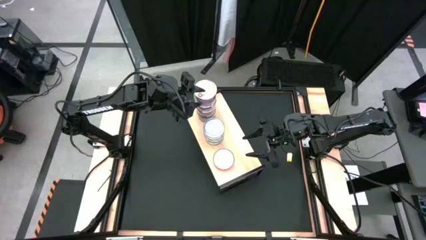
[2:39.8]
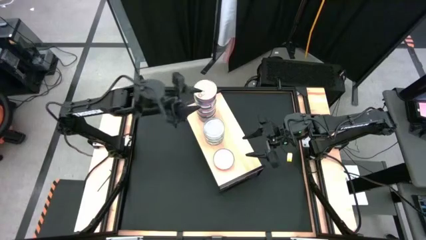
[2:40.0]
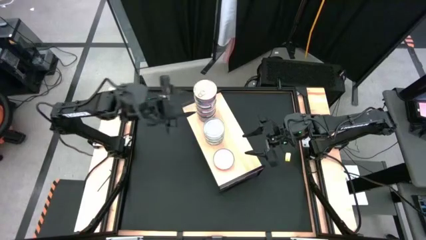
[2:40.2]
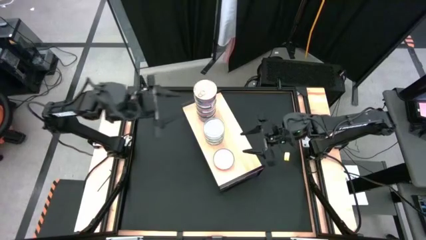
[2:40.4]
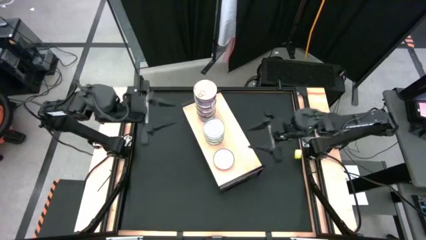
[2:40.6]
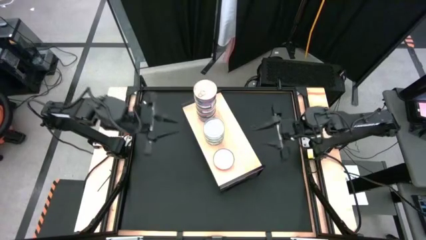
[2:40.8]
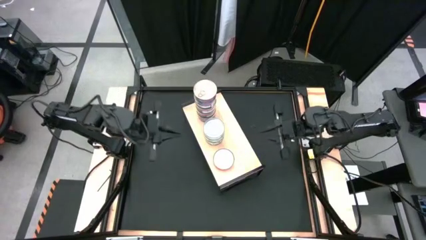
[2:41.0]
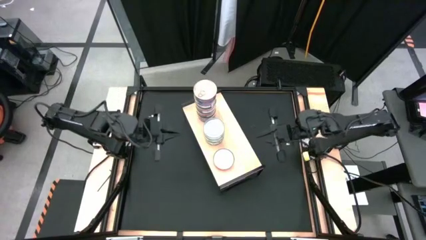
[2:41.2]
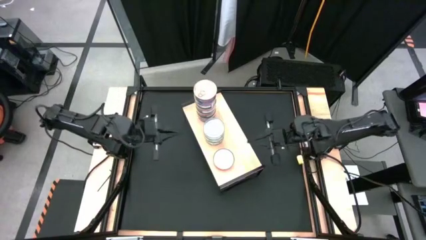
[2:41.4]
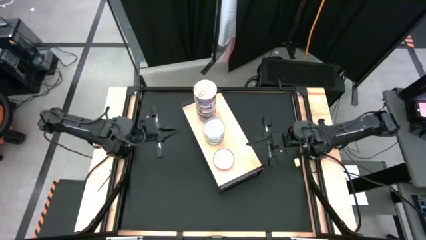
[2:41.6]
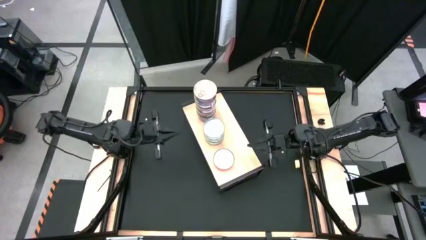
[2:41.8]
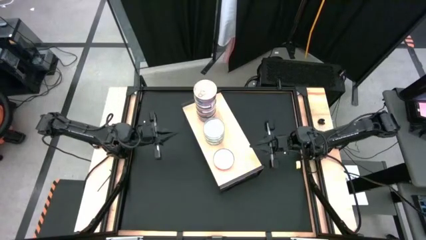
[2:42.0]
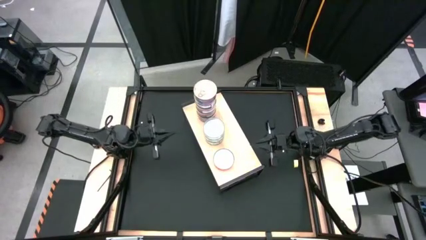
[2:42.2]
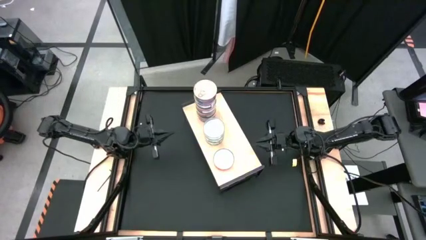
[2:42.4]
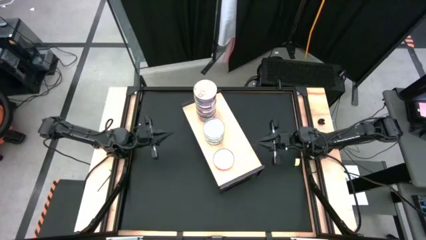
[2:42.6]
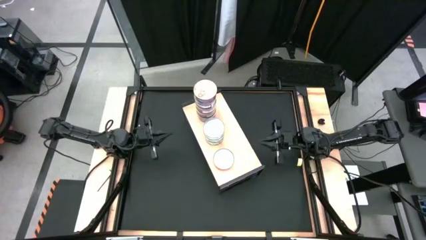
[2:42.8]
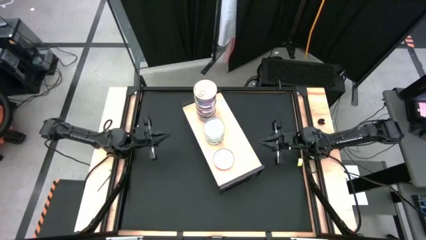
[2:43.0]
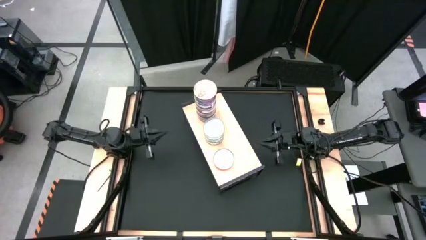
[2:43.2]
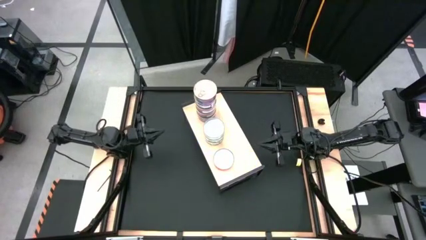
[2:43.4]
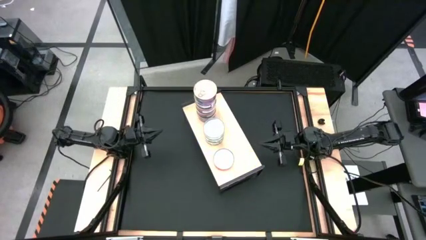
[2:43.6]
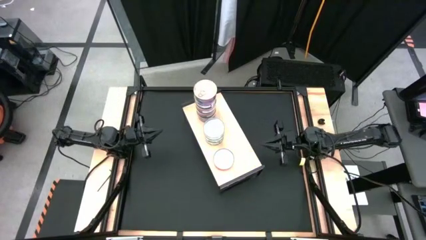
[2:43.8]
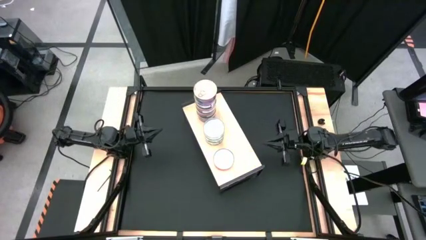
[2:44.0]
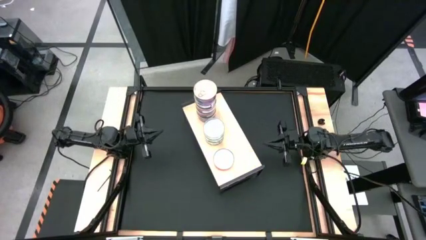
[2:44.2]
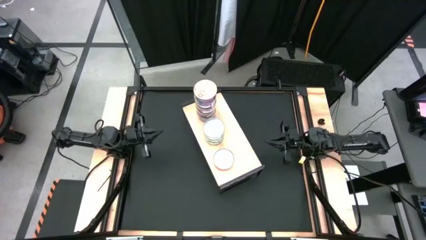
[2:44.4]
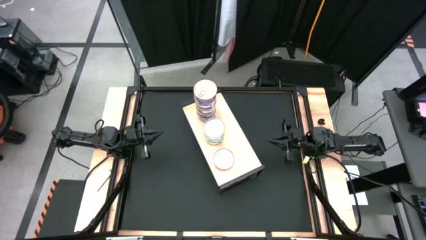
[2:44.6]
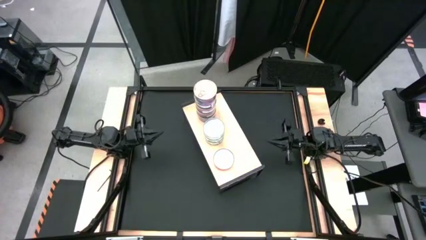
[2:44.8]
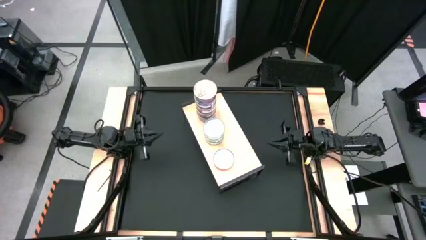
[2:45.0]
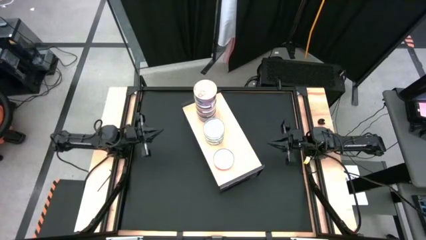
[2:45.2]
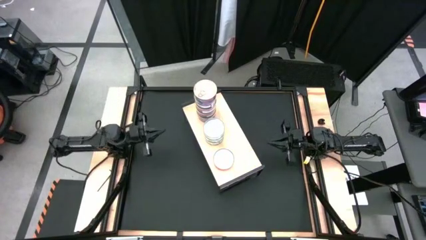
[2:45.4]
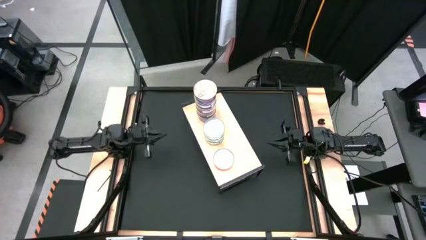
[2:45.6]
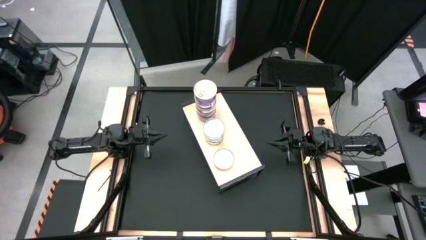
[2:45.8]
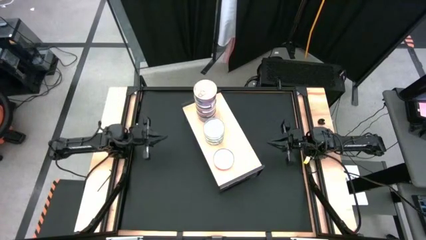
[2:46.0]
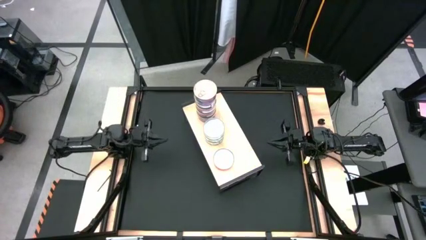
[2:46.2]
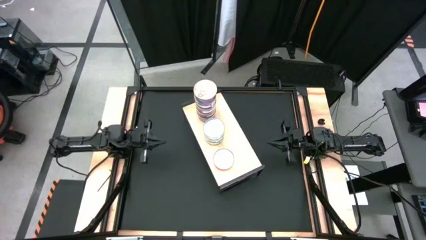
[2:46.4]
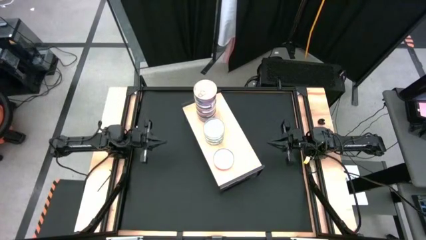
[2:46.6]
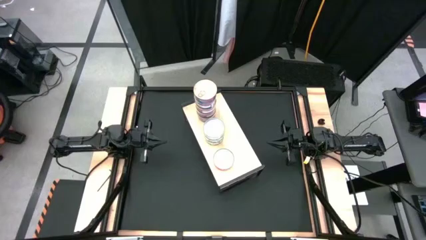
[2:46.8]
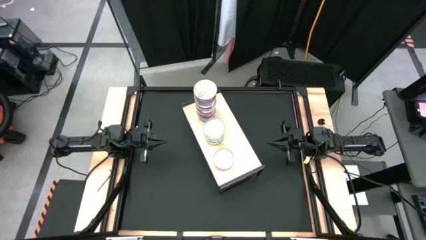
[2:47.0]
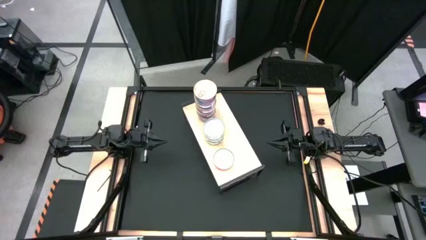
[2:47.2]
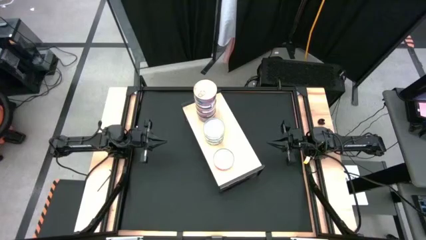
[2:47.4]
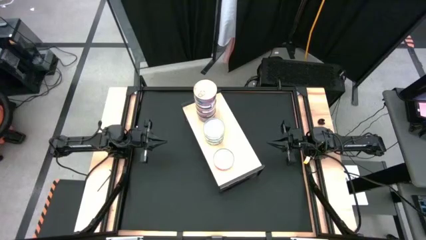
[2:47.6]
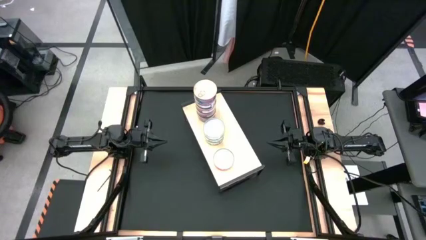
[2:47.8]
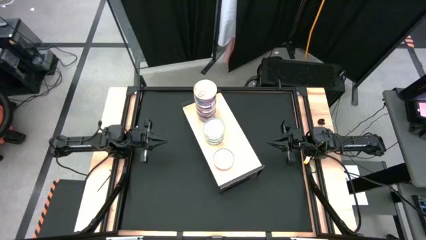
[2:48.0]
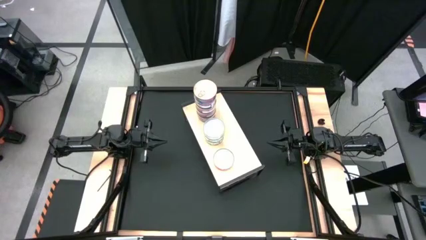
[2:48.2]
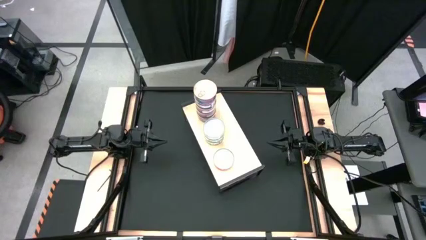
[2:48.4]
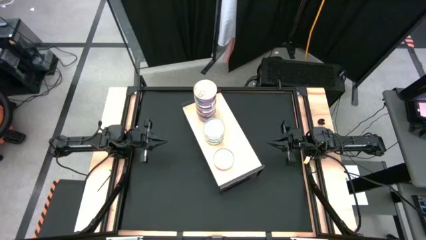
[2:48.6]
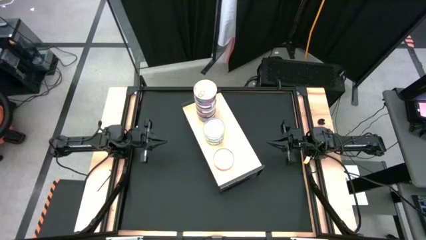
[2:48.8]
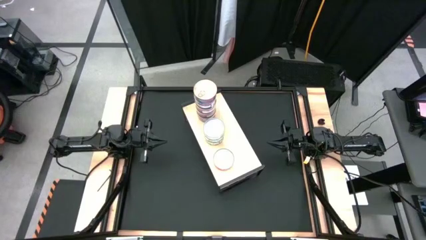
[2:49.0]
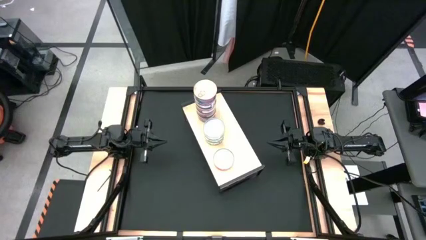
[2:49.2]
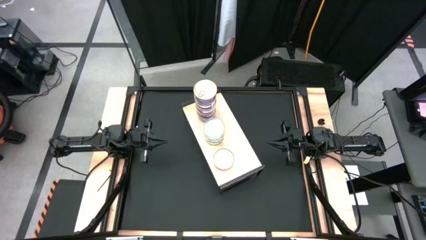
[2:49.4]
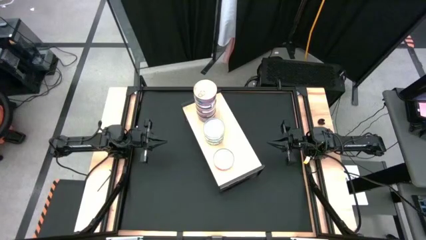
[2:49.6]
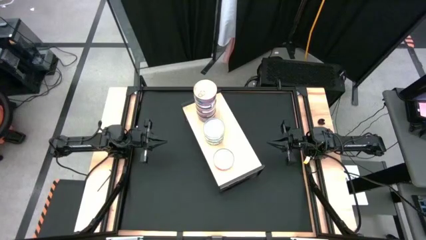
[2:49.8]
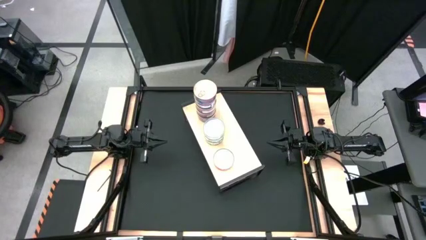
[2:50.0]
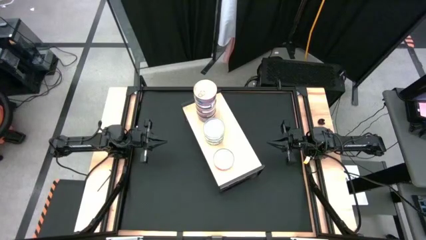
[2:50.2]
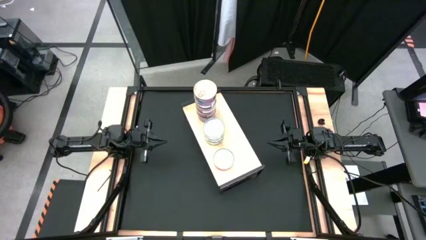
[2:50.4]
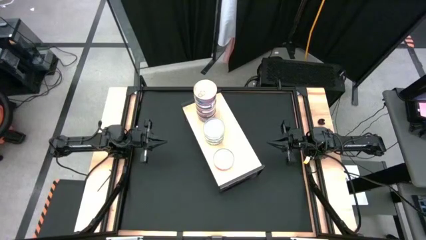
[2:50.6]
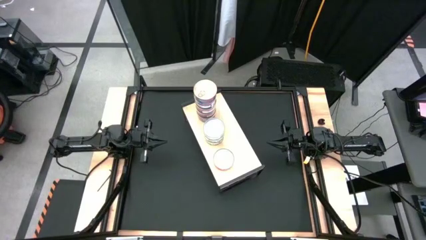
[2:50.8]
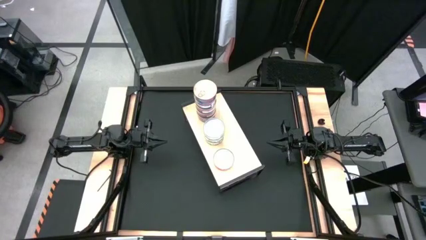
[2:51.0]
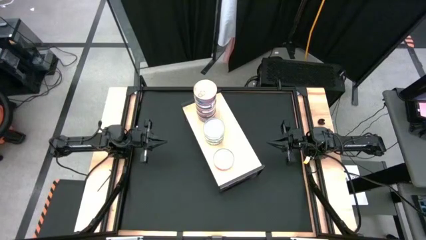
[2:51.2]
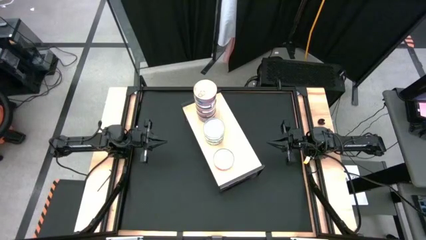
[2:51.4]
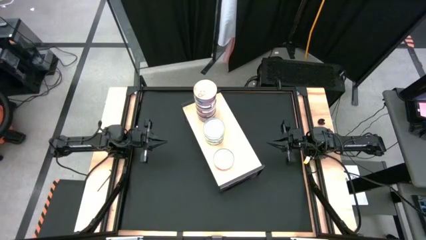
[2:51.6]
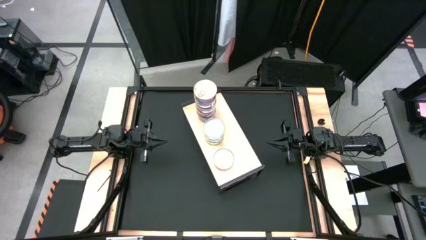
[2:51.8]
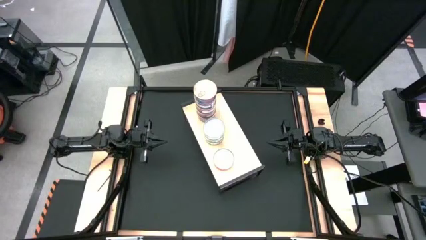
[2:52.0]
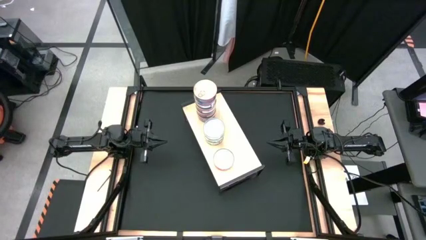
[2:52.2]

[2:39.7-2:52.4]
Task: Stack canned seafood by type on shelf
Return to Home Position

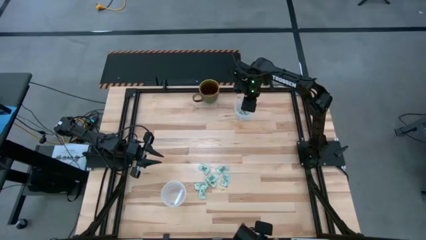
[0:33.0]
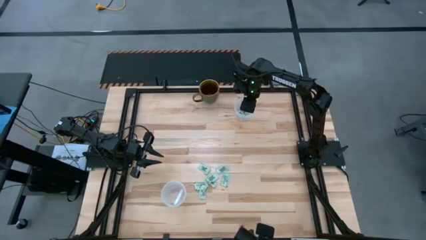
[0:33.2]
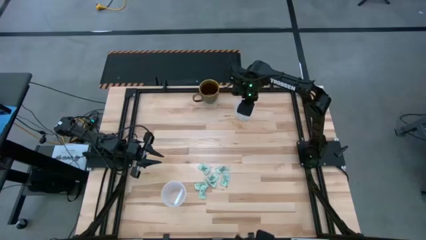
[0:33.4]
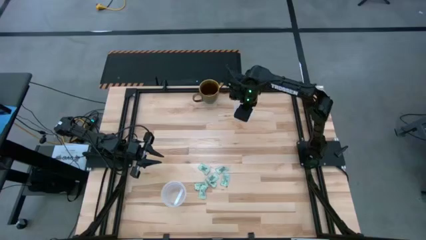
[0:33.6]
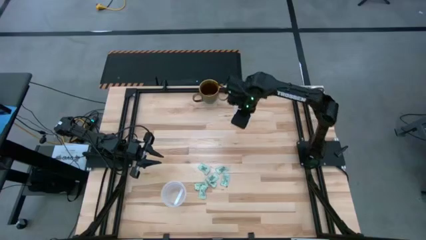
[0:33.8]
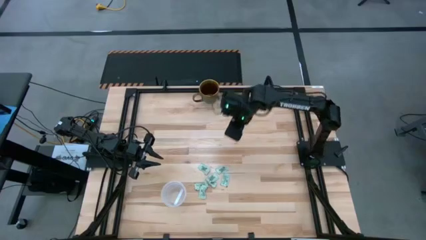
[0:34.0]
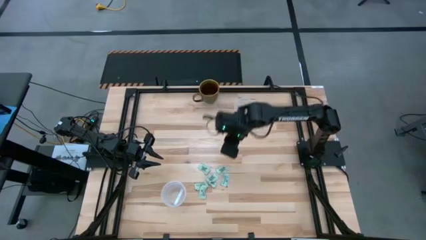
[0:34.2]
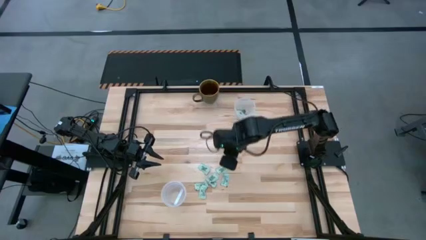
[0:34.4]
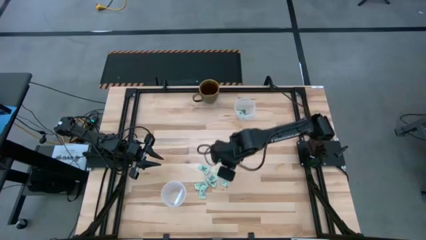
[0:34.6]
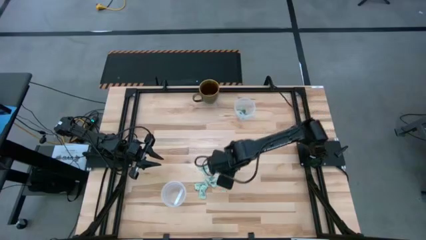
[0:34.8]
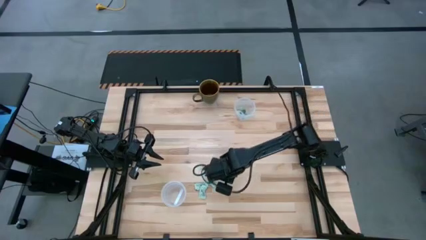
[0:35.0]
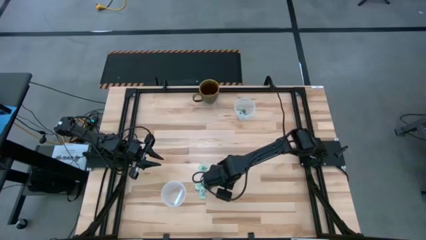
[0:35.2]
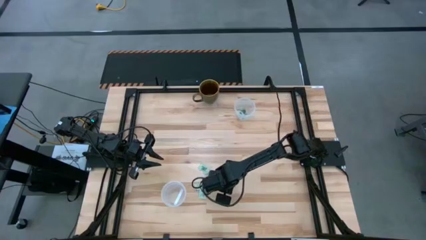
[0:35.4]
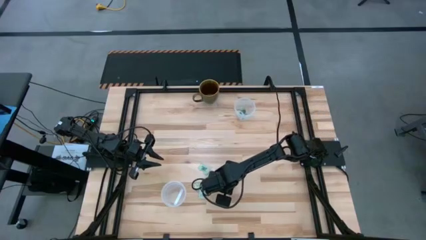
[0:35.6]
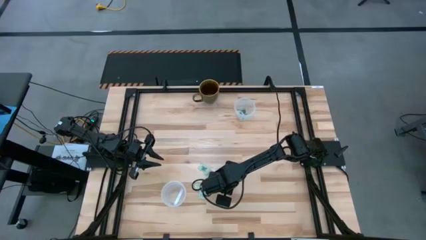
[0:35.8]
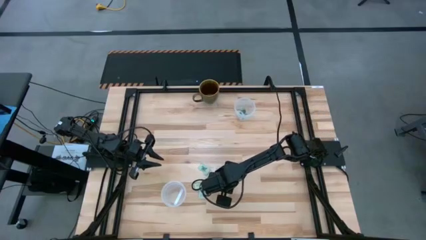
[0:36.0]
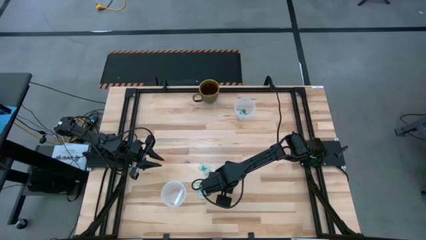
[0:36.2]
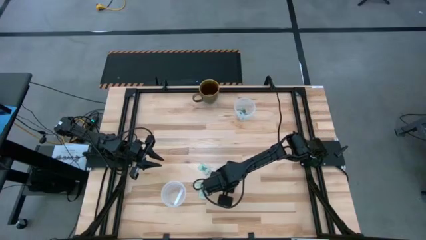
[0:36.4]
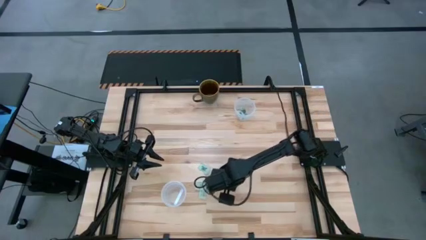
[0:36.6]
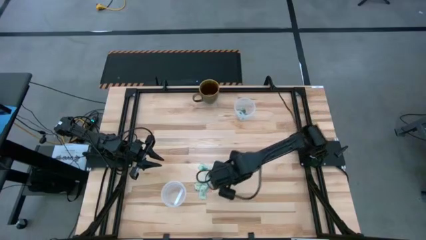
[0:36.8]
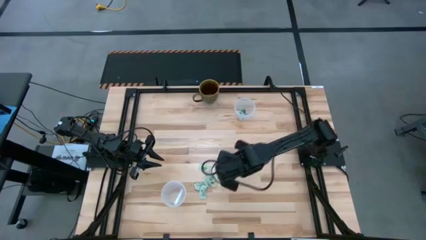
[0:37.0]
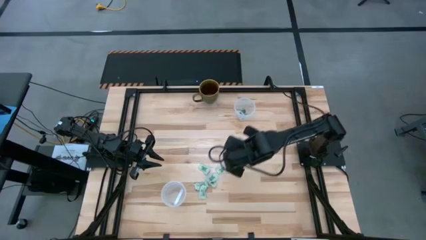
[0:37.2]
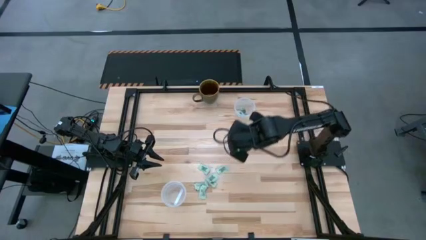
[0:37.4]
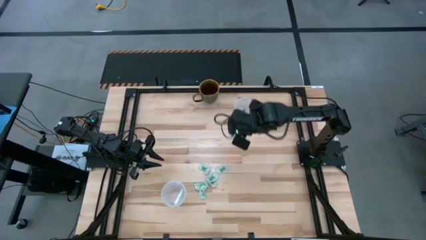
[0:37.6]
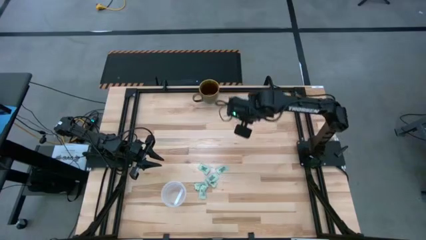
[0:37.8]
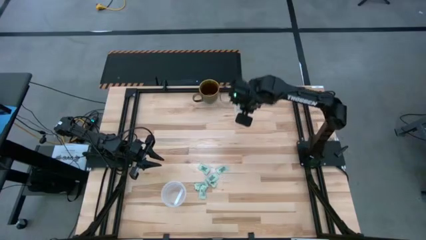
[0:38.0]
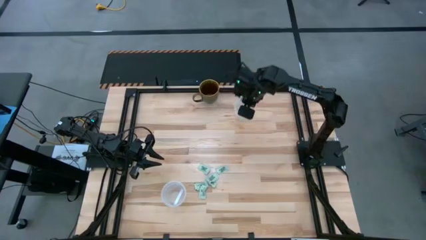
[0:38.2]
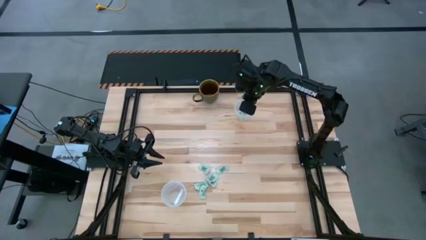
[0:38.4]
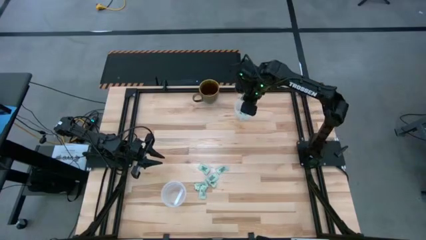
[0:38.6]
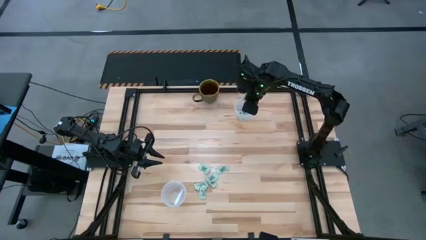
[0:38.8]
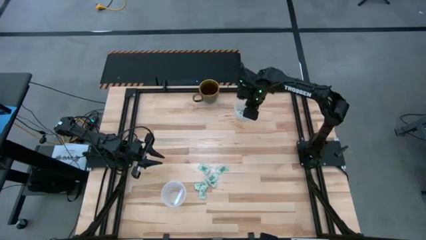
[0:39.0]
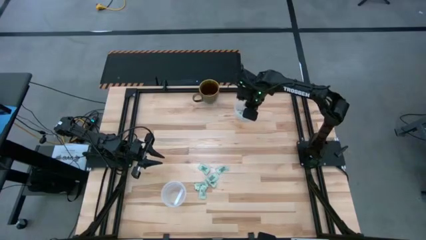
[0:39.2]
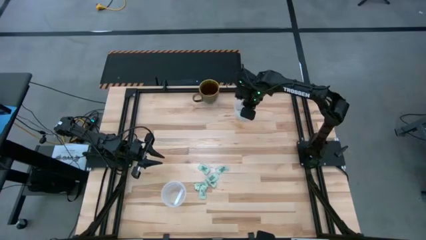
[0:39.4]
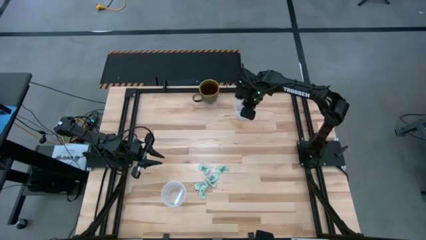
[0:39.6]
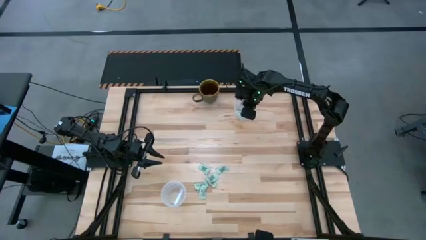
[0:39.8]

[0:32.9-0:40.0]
Task: Pick and place items into bin
Put the stevia packet into the top transparent bin
